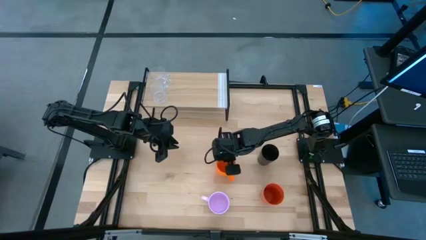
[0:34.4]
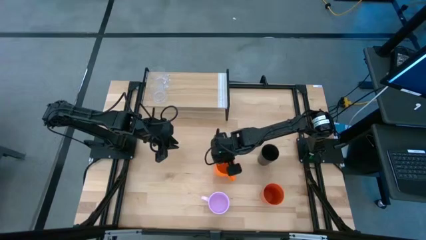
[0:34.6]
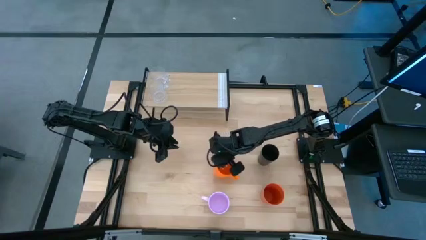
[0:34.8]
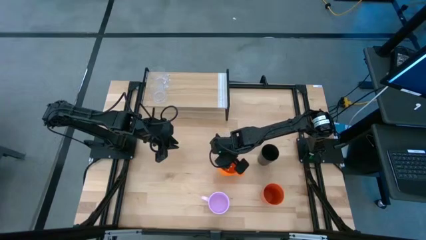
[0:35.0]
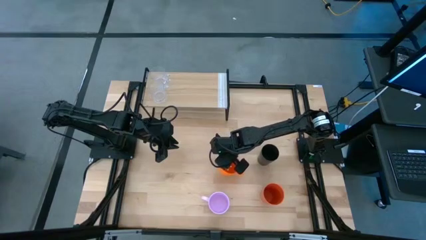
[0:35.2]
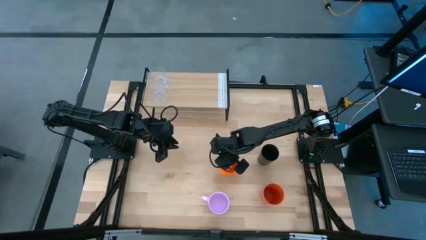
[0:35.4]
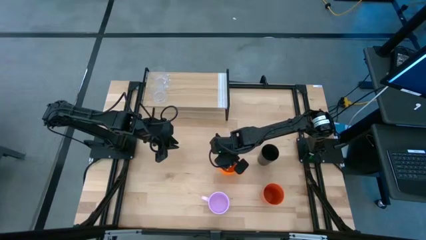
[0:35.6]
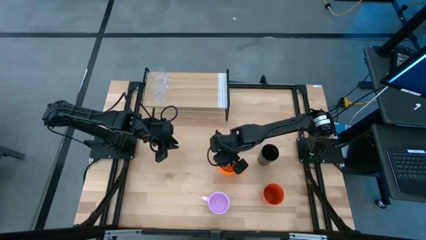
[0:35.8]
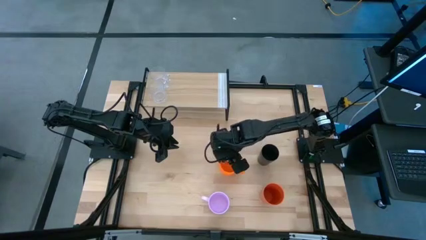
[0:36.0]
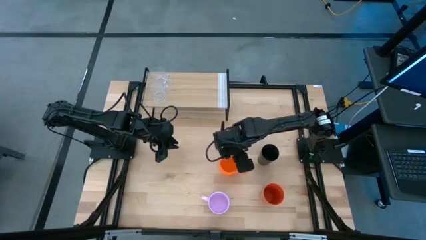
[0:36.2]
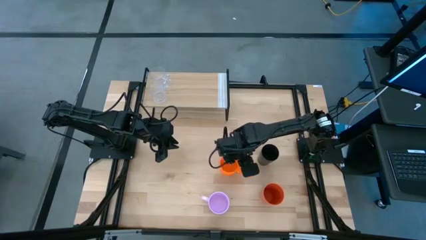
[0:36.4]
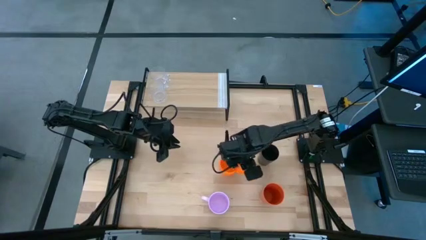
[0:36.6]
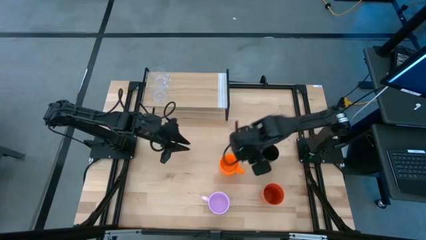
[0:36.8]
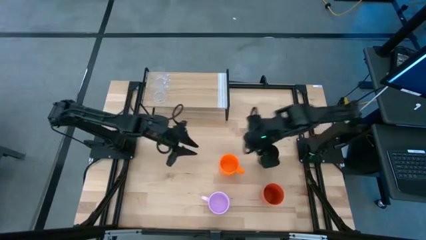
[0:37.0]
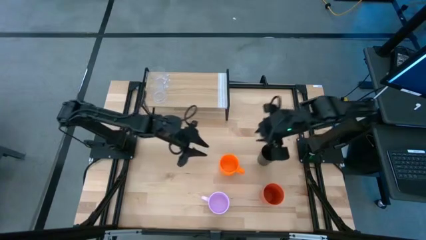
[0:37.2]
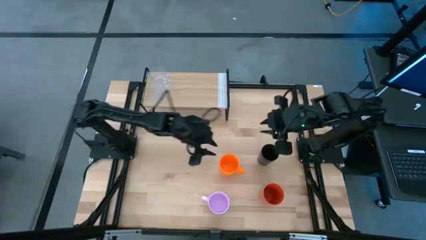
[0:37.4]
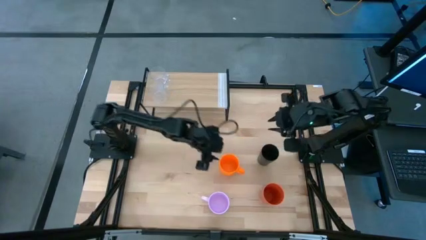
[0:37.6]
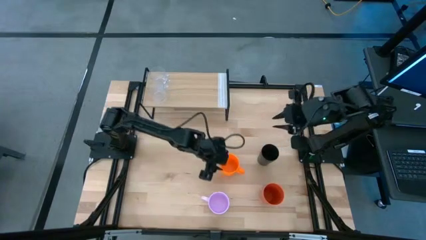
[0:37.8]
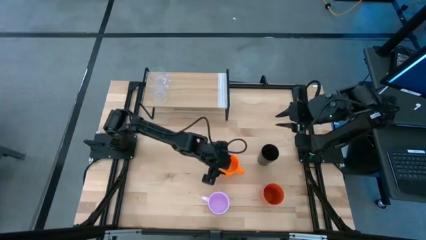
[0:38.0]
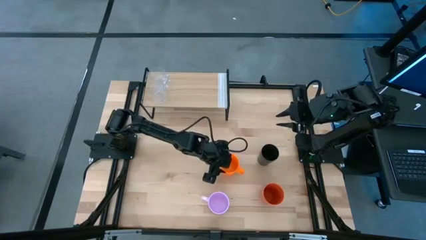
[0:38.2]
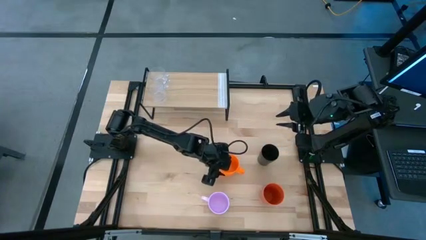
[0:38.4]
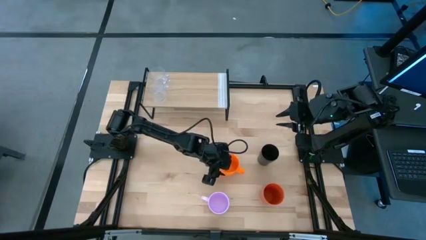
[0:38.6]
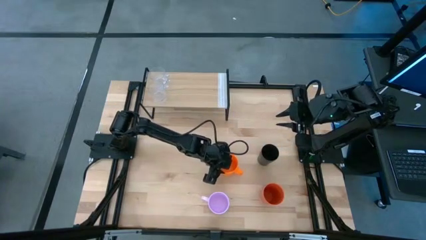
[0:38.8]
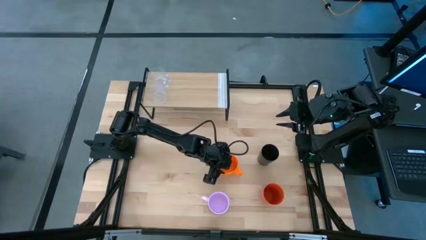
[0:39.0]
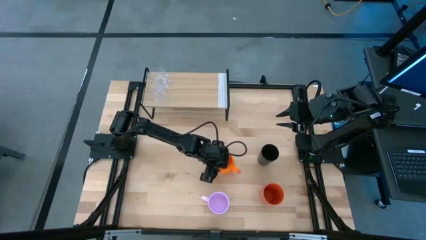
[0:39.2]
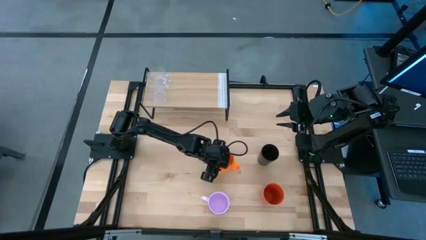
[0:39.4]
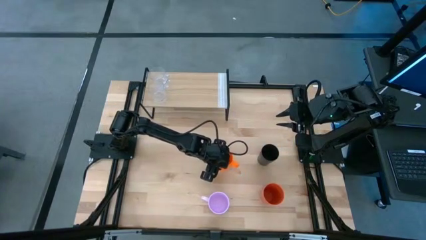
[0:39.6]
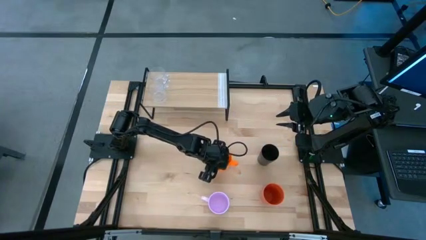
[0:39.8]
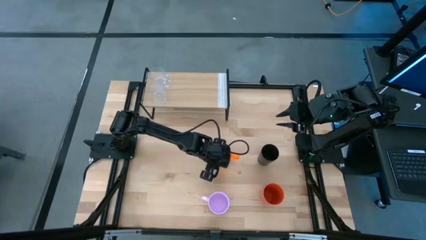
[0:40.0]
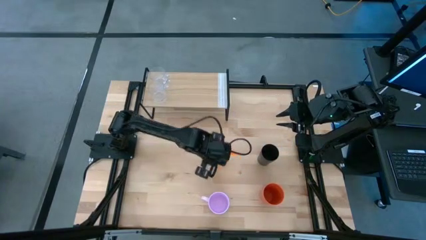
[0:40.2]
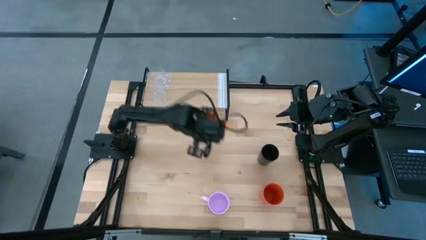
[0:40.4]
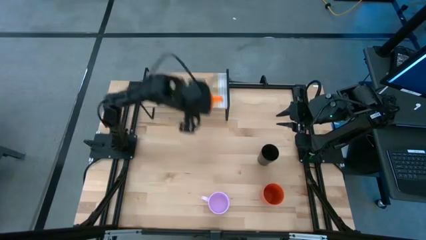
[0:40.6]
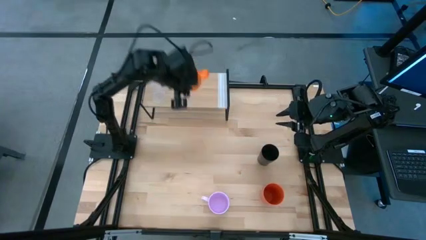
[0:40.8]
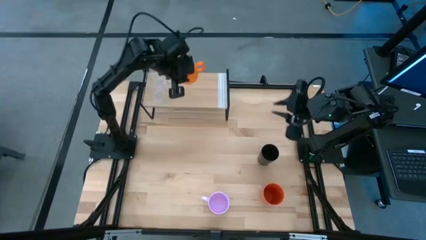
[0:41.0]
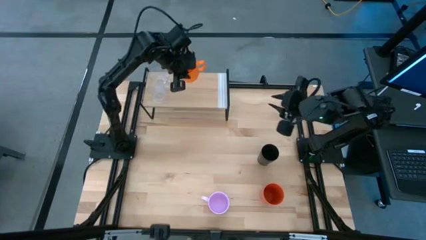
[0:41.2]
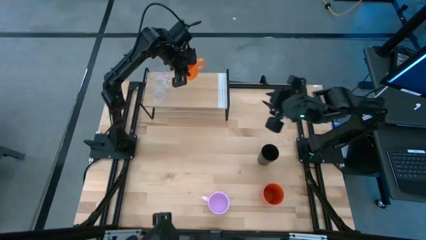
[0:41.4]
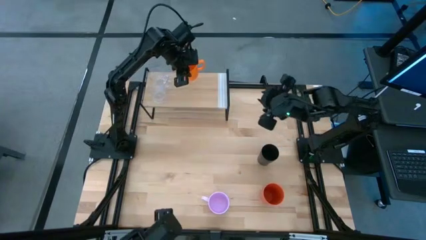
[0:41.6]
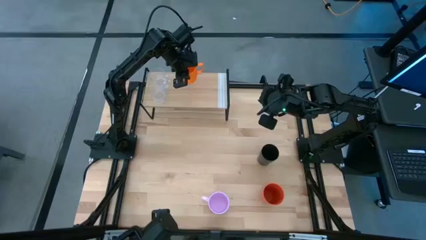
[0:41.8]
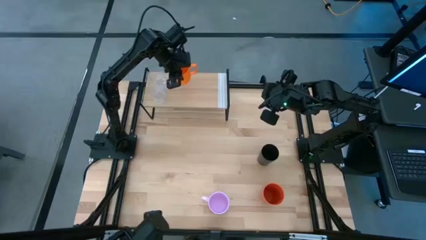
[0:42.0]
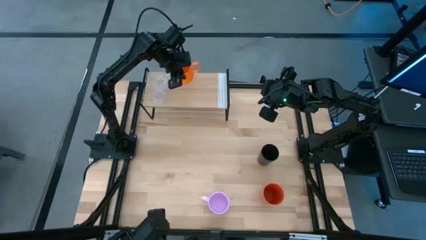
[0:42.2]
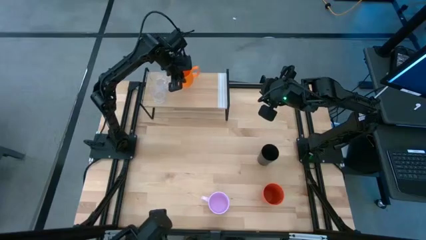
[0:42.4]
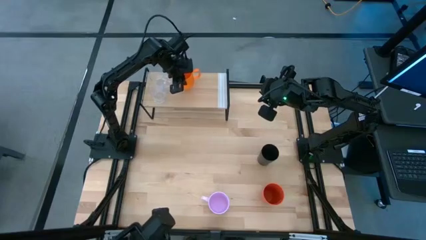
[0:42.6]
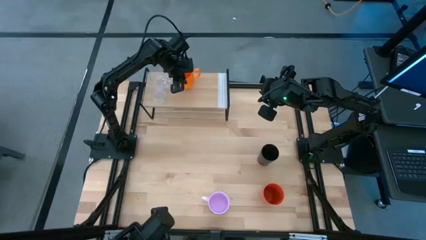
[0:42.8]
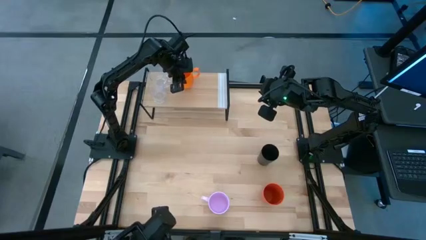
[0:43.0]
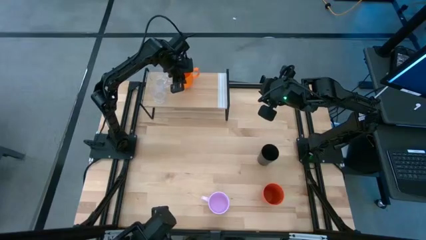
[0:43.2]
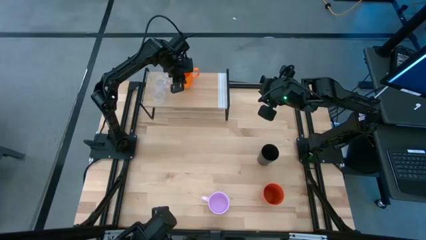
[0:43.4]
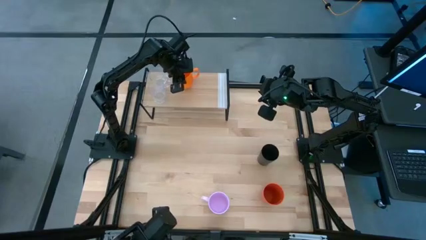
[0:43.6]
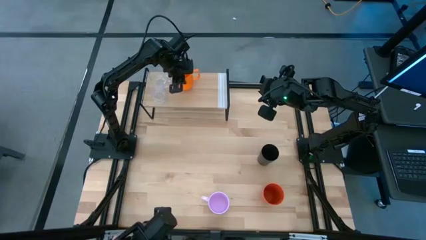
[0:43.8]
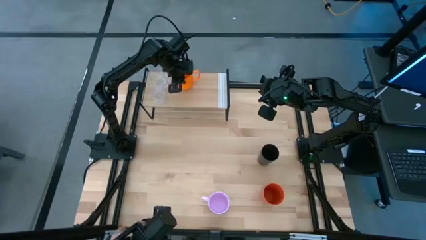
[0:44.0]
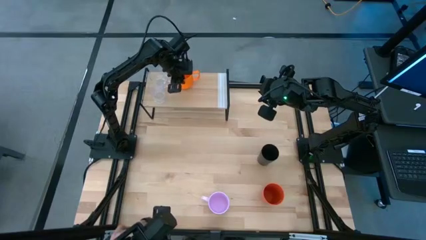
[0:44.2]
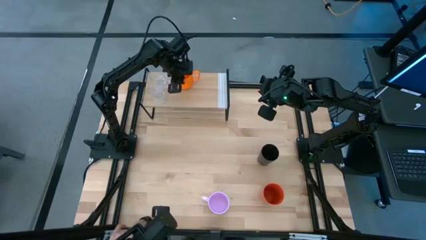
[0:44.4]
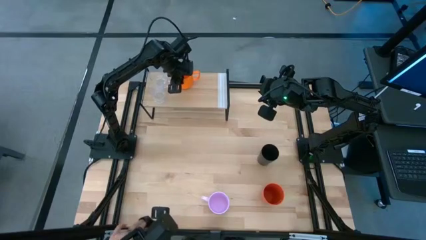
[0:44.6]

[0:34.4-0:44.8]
Task: Stack small to large cups/mugs on shelf
Put the orange mug on the shelf
